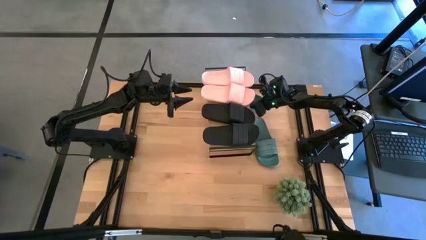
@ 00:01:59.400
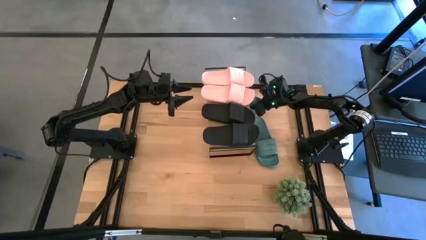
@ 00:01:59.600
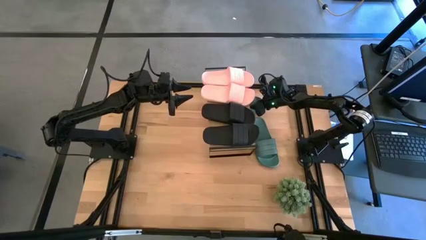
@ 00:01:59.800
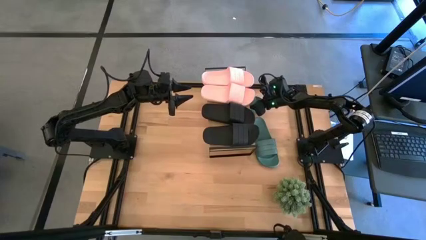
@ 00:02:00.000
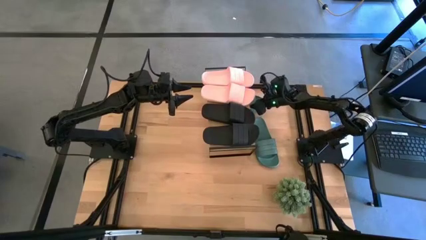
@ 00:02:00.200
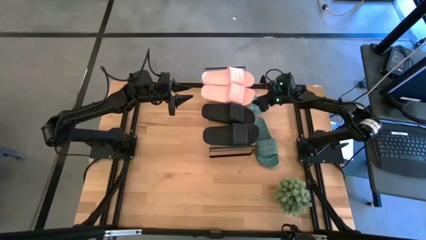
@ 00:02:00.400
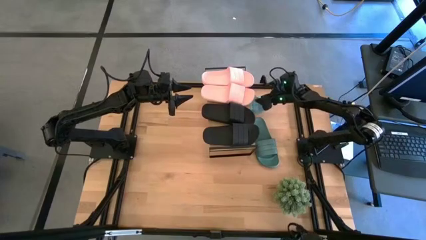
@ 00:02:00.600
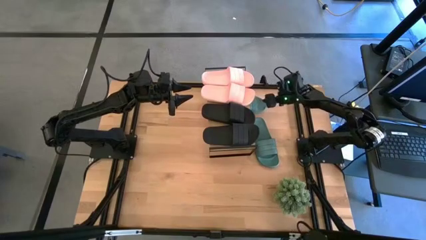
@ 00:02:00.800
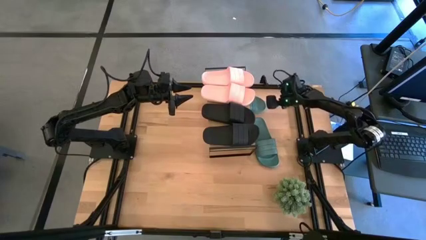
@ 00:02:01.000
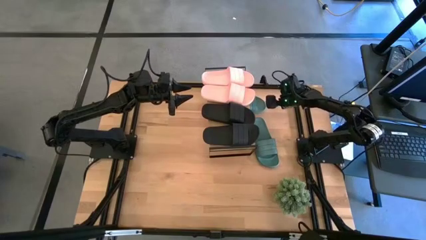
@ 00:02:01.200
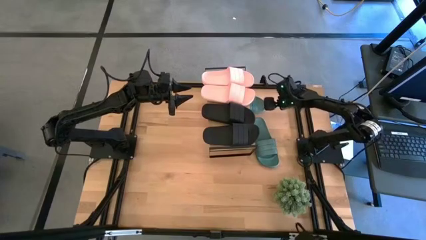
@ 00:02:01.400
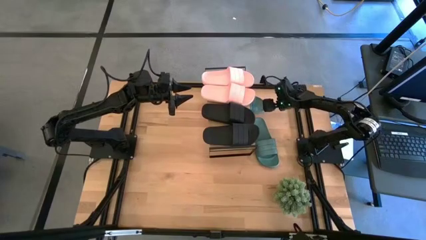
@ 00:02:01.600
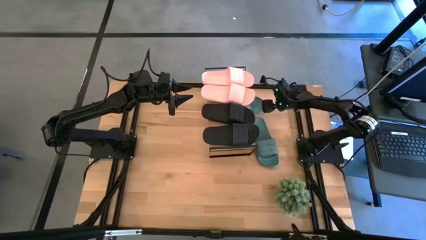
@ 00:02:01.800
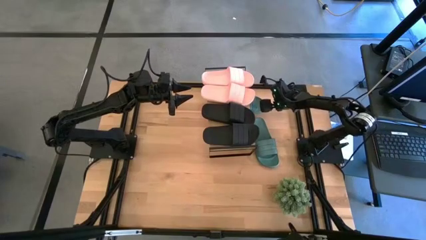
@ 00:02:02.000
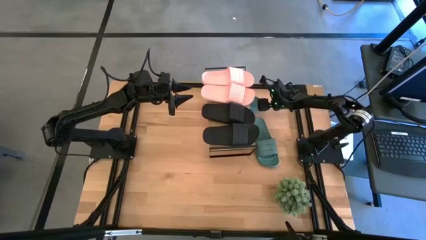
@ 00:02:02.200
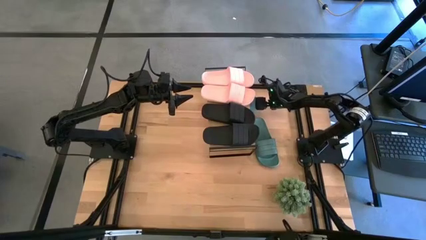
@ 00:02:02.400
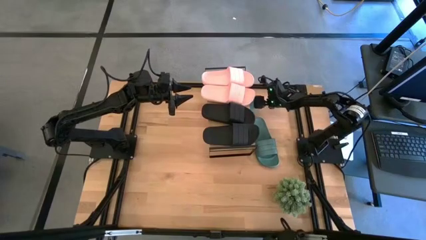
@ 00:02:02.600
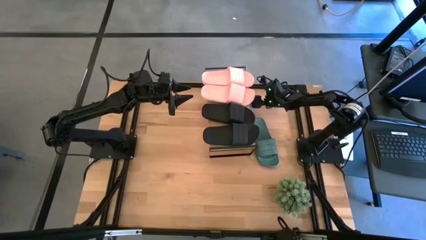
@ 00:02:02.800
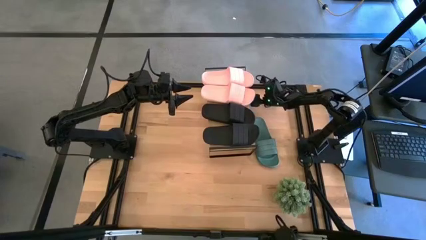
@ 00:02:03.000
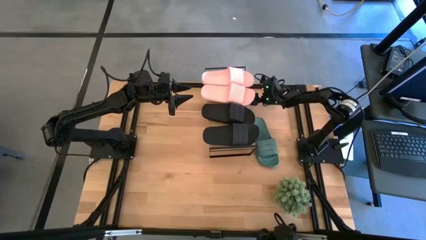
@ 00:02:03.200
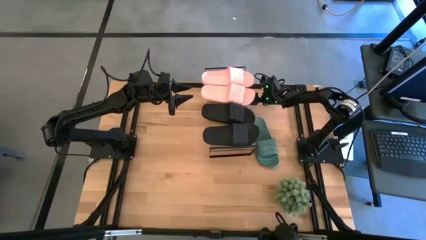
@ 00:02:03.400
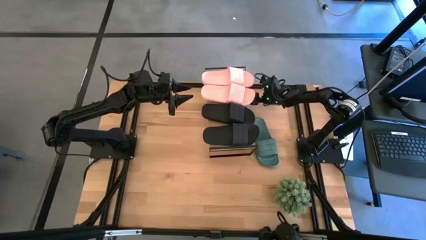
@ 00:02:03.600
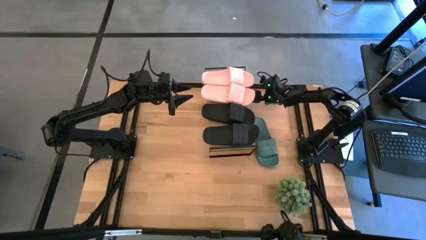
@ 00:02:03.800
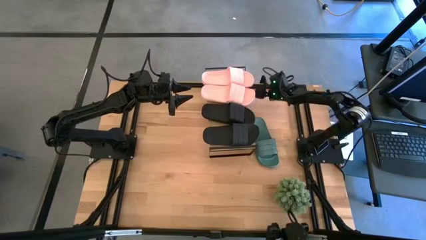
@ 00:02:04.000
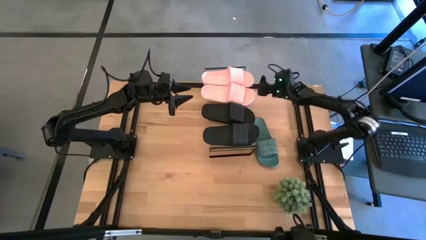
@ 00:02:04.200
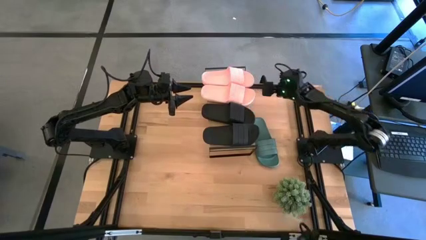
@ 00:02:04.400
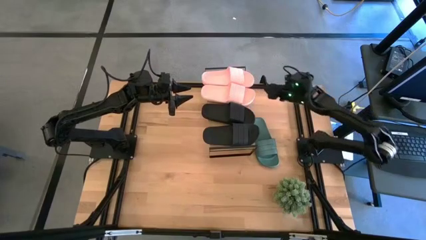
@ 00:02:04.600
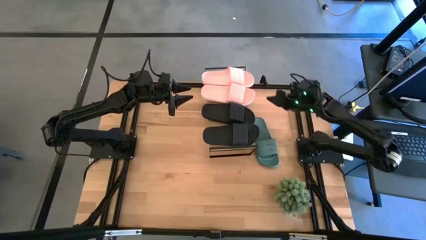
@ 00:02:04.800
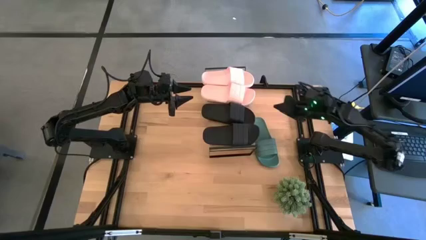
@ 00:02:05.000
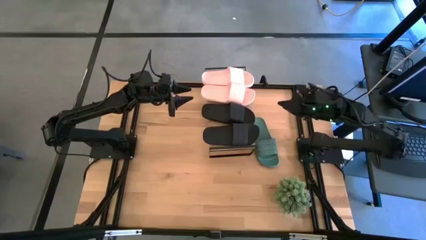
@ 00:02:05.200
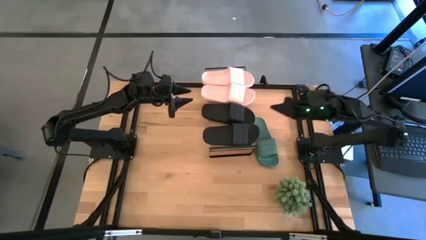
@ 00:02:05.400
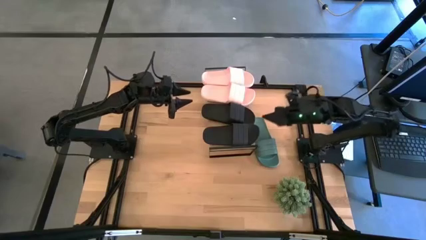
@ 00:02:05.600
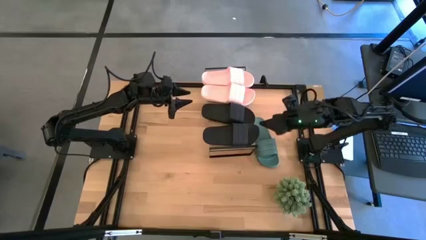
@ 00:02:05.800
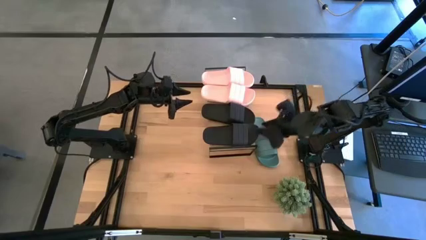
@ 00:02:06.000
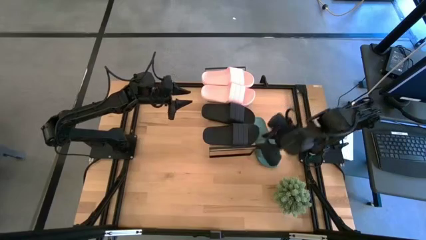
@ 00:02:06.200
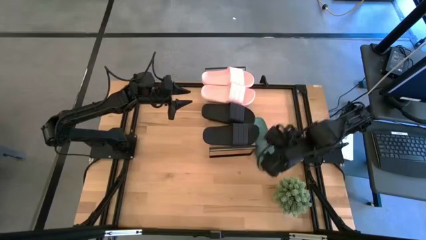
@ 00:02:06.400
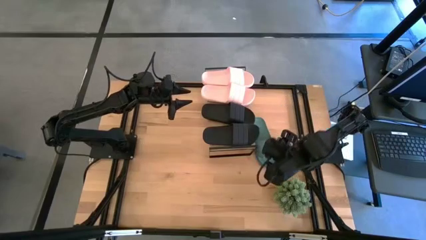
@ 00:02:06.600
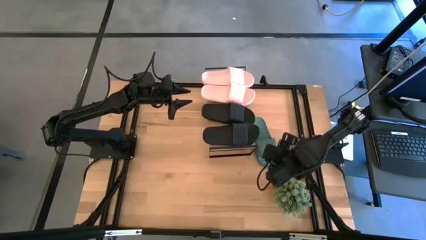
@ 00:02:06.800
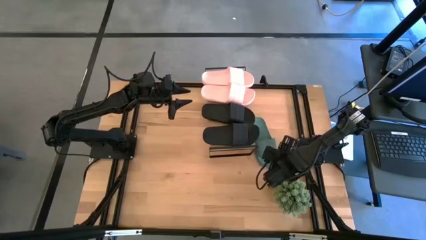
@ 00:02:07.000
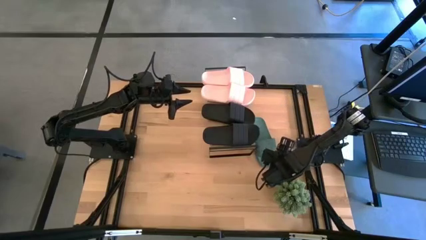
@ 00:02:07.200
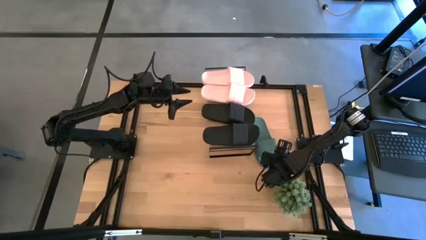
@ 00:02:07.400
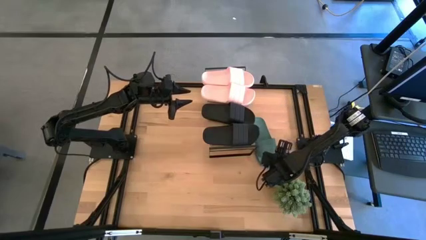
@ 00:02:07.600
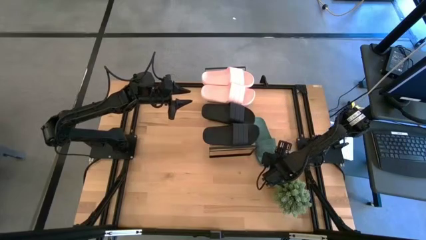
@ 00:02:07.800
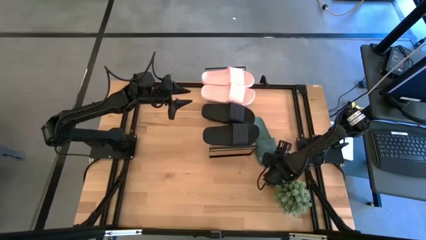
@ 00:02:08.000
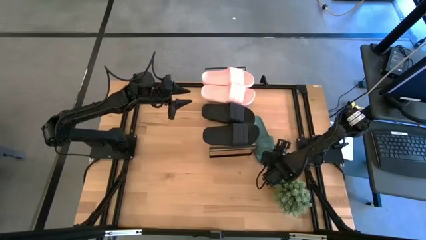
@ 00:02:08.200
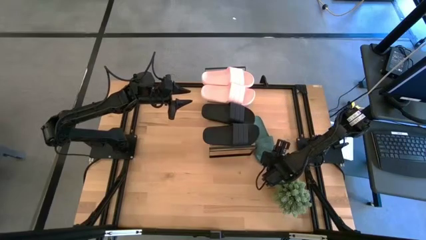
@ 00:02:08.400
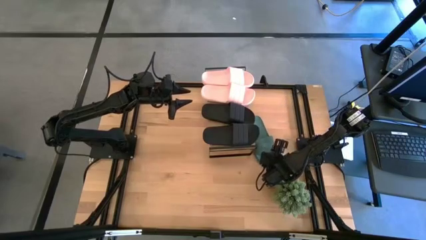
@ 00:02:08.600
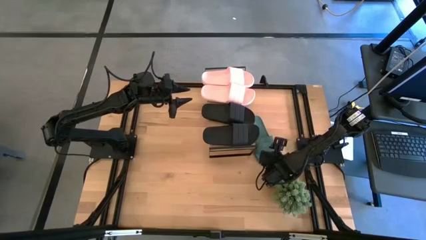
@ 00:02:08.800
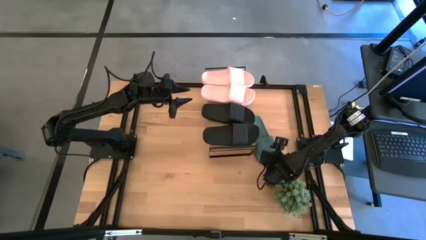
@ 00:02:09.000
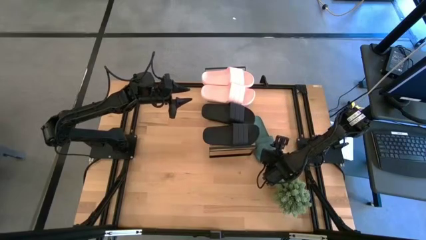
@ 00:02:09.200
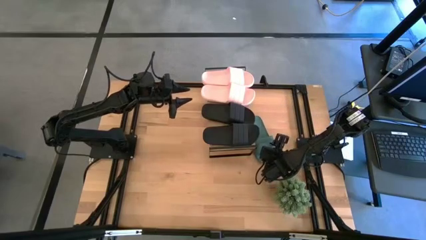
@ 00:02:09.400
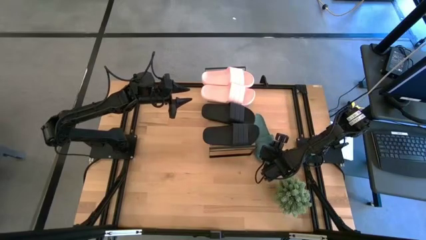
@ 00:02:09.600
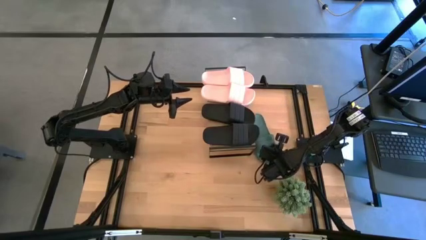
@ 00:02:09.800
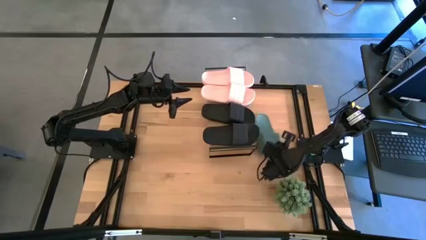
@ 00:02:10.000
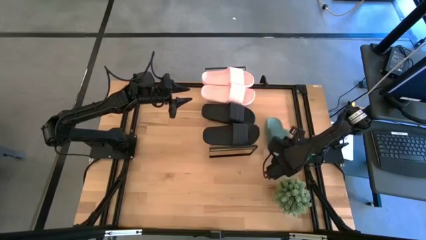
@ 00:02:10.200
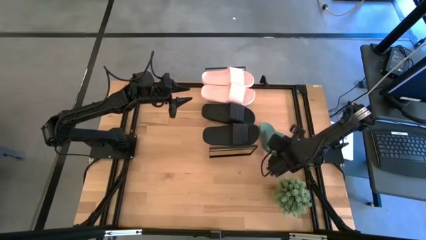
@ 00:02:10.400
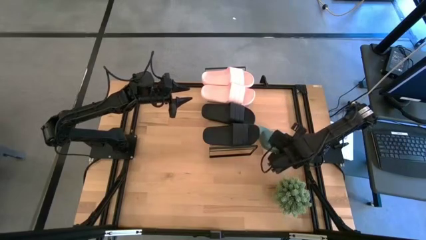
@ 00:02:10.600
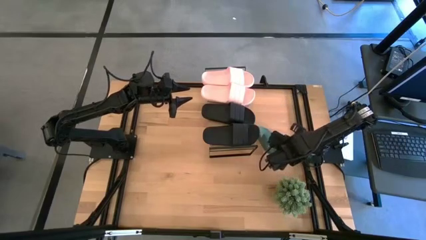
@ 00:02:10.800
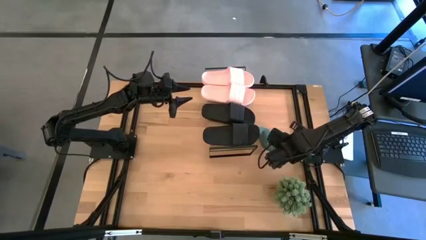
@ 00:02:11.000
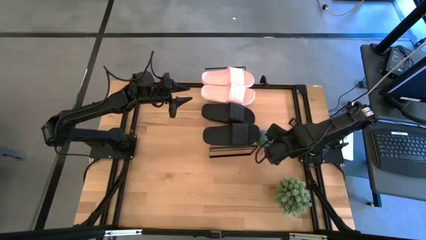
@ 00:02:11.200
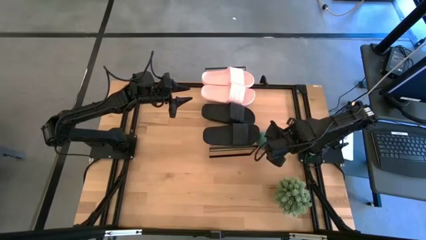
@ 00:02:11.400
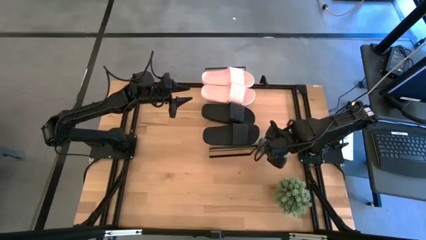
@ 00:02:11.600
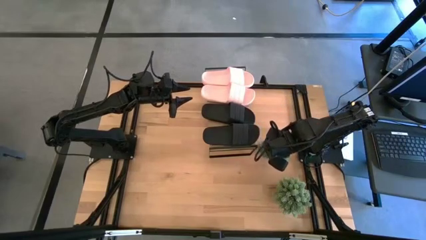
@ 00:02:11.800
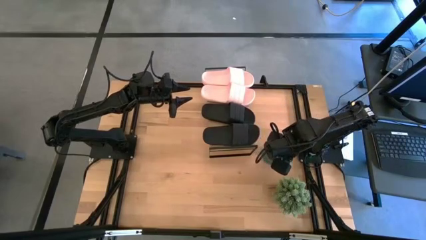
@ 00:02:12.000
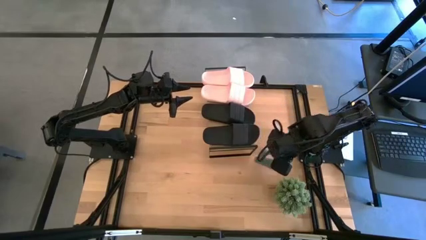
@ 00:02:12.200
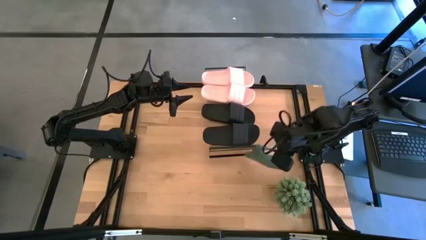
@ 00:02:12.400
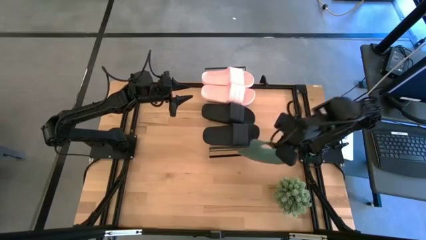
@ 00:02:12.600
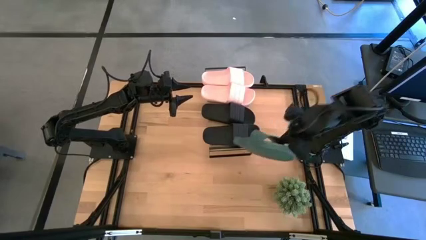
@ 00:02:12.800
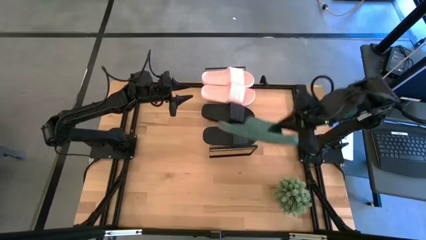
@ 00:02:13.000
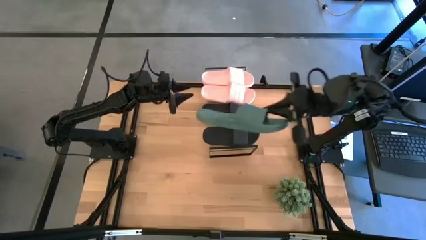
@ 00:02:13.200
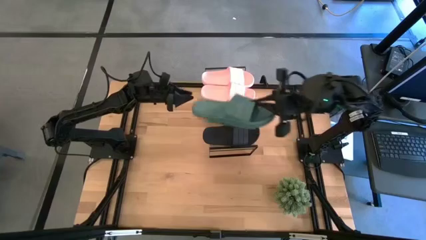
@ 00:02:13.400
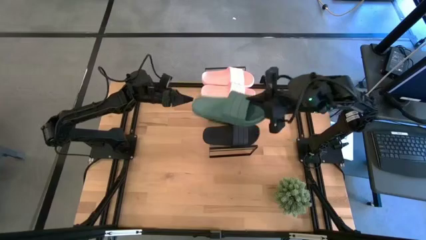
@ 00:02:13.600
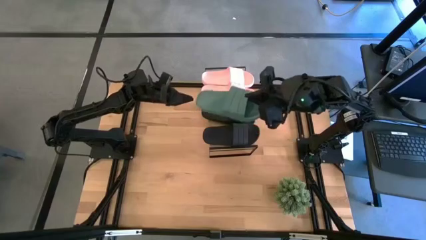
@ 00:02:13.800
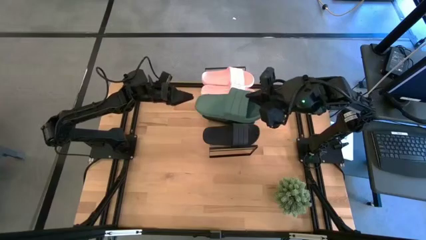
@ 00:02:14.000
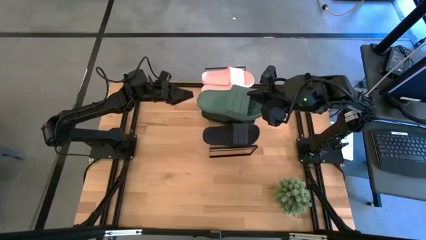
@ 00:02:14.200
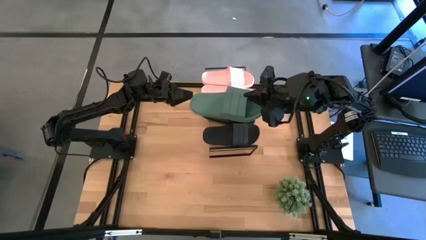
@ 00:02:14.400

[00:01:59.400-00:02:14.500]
Task: Pick and place slides into the shelf
Put the green slide under the shelf
